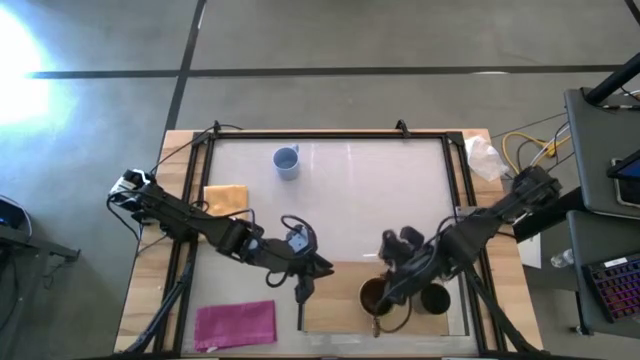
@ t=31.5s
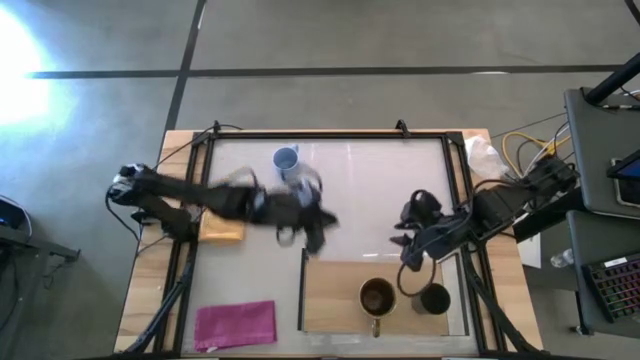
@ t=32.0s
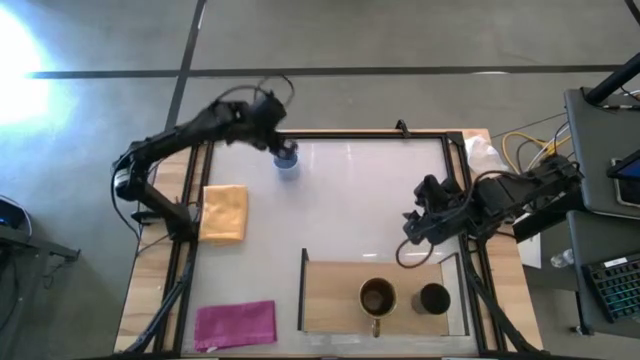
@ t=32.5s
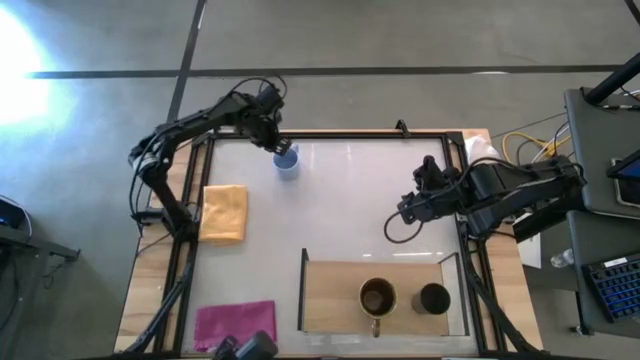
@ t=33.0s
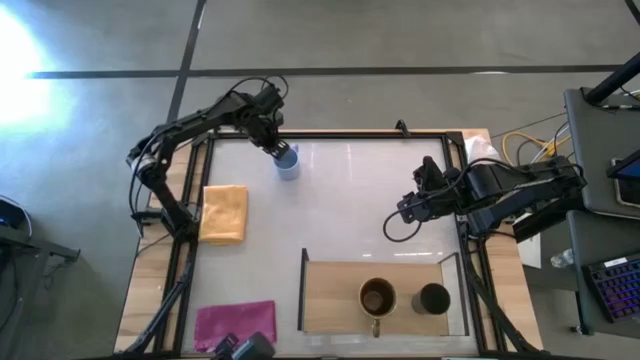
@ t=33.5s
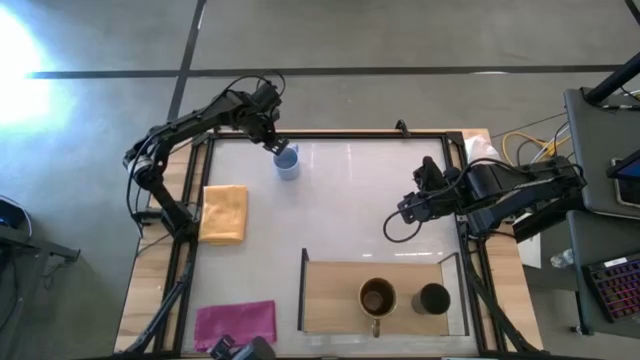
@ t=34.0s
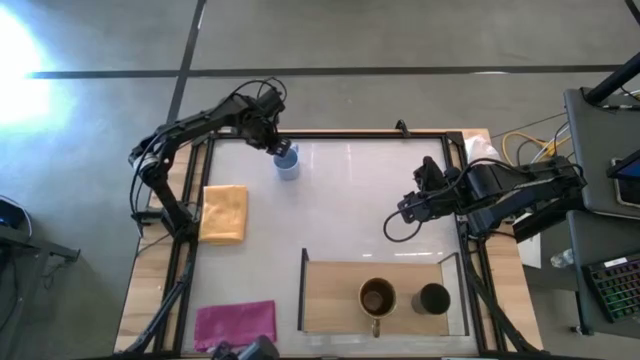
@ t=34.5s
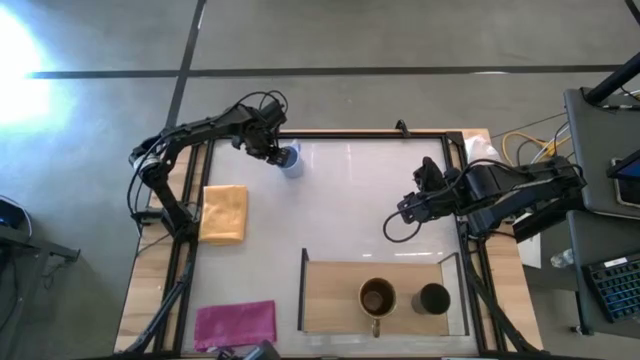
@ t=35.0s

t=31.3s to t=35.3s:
Task: Stack small to large cups/mugs on shelf
Put the blue mug on the shelf

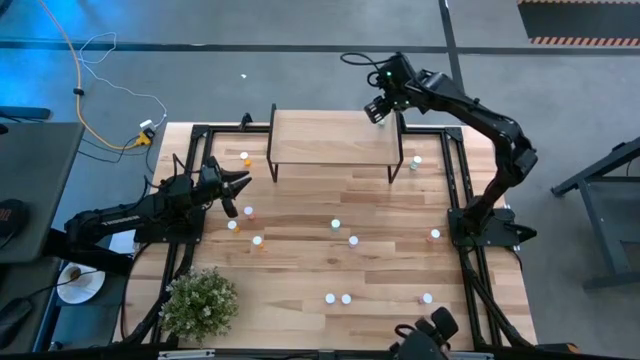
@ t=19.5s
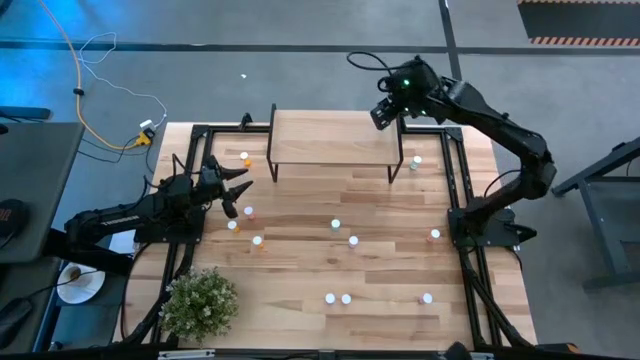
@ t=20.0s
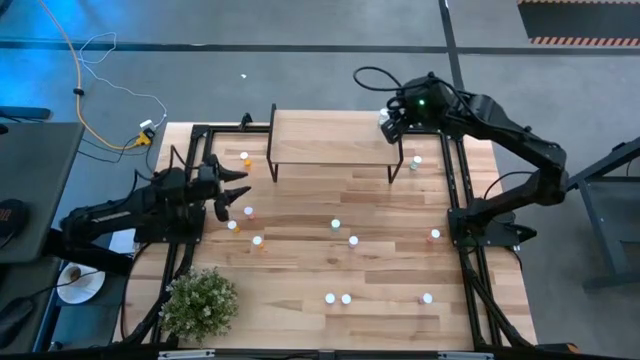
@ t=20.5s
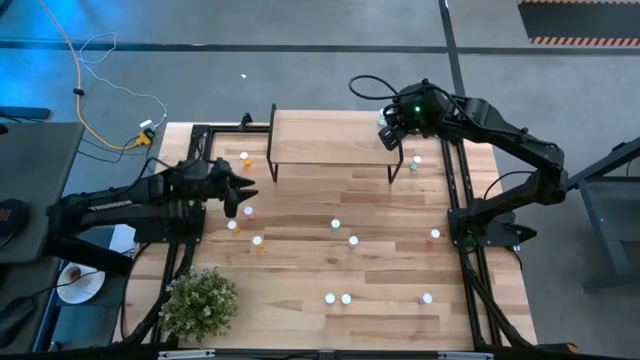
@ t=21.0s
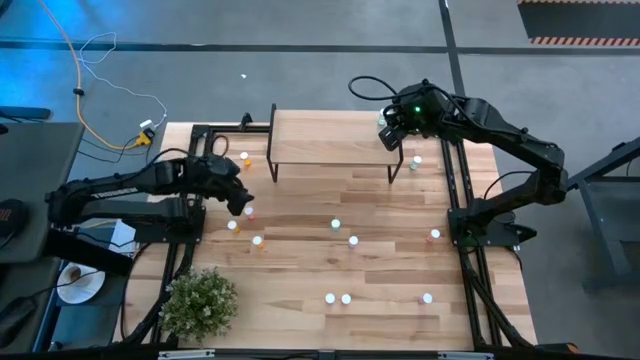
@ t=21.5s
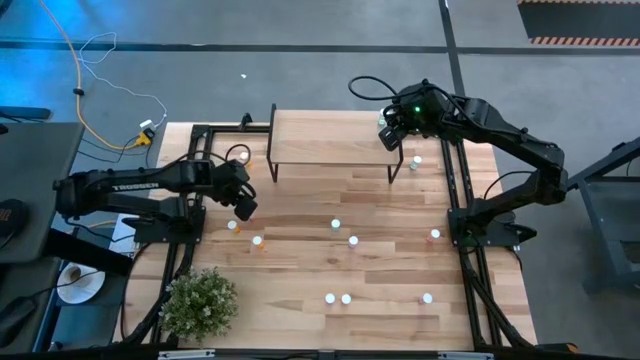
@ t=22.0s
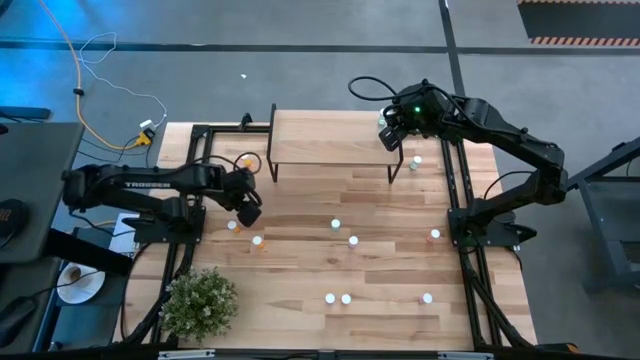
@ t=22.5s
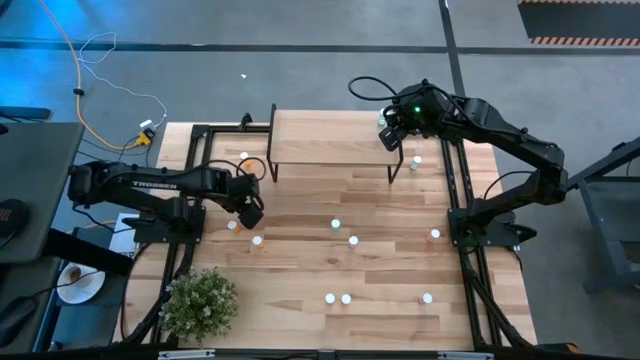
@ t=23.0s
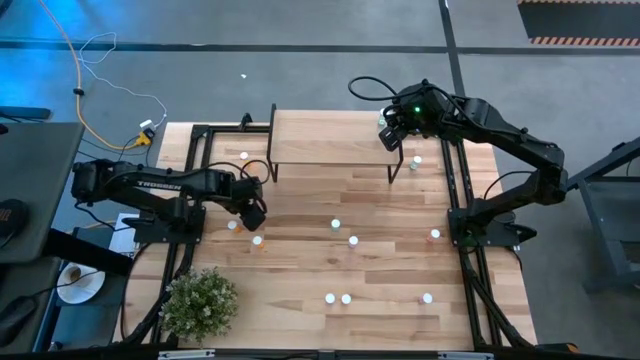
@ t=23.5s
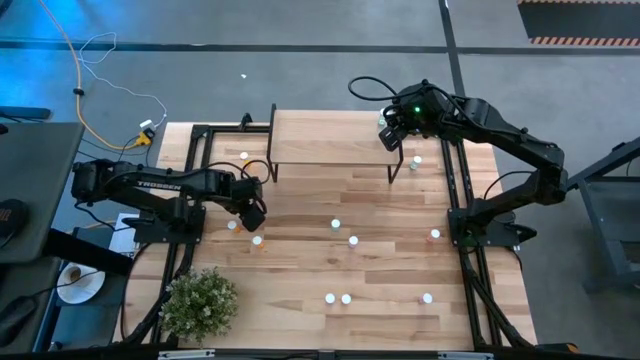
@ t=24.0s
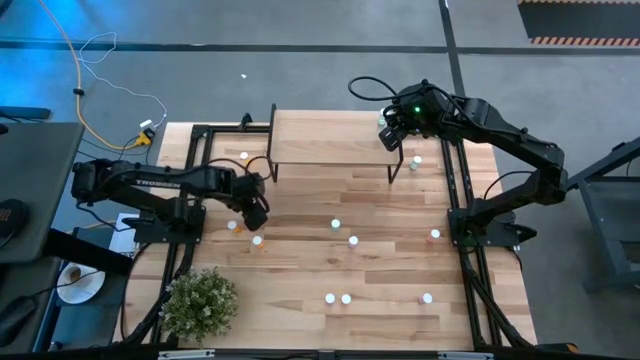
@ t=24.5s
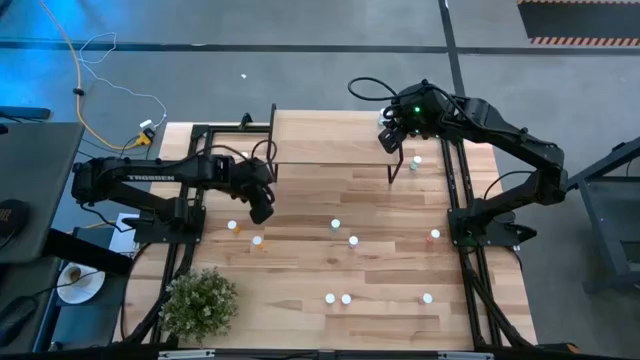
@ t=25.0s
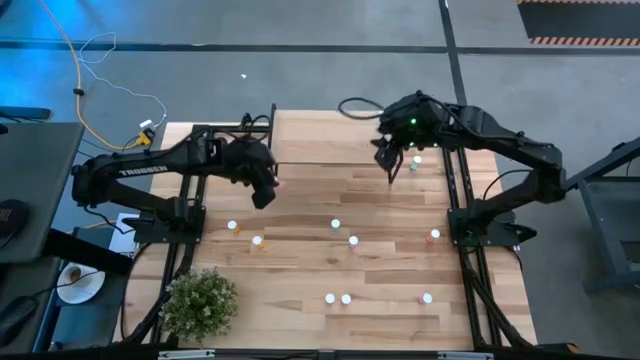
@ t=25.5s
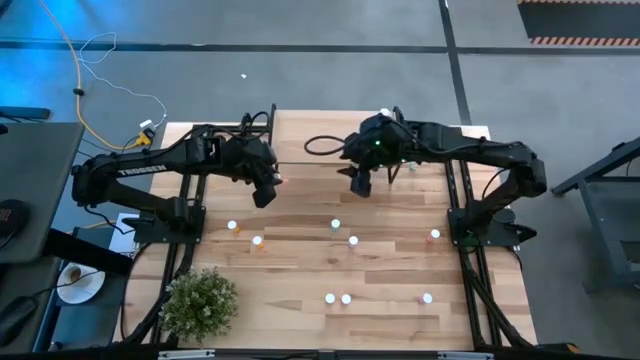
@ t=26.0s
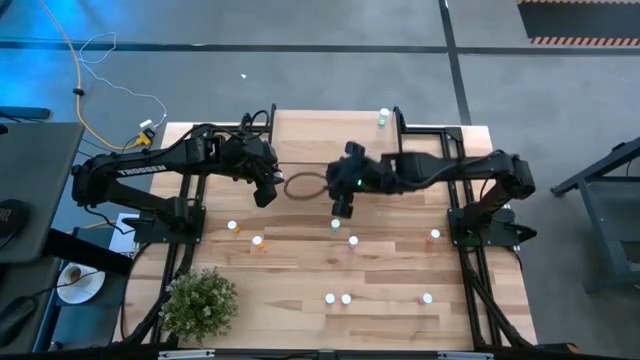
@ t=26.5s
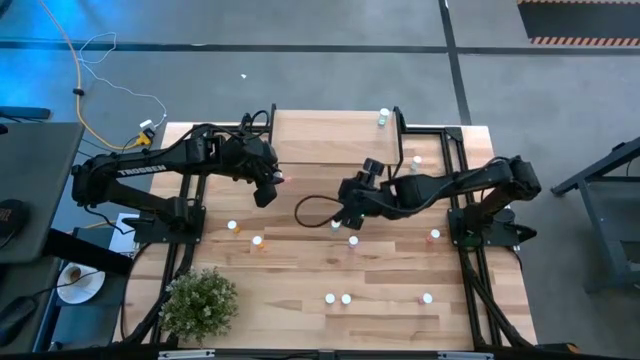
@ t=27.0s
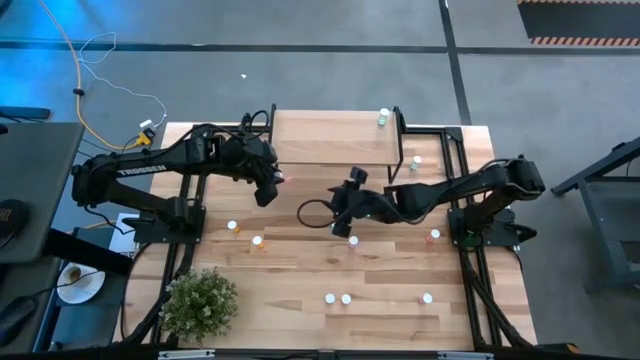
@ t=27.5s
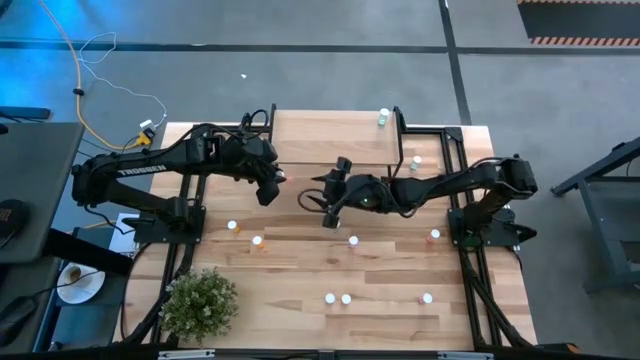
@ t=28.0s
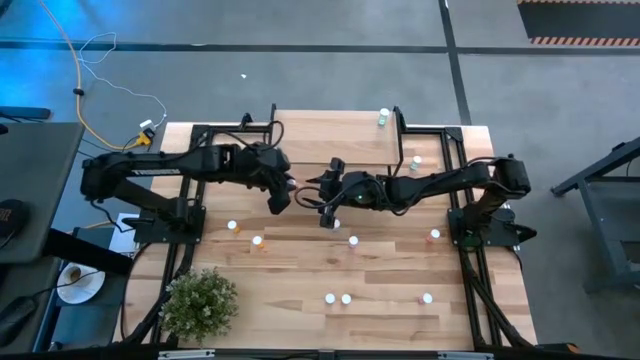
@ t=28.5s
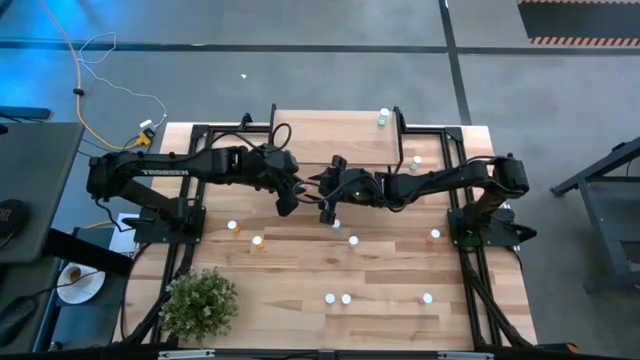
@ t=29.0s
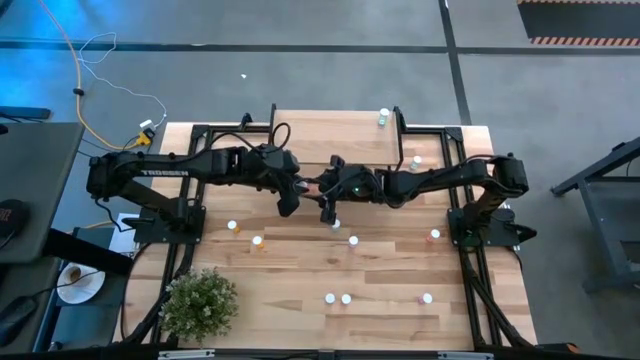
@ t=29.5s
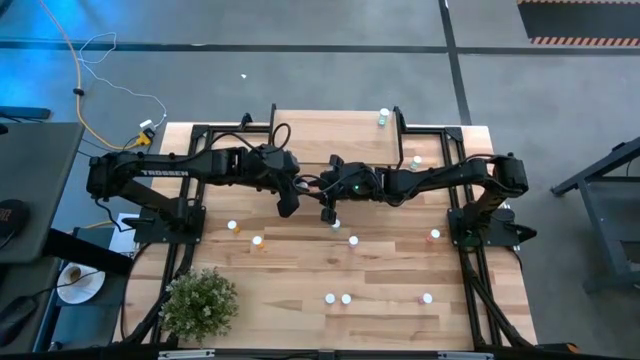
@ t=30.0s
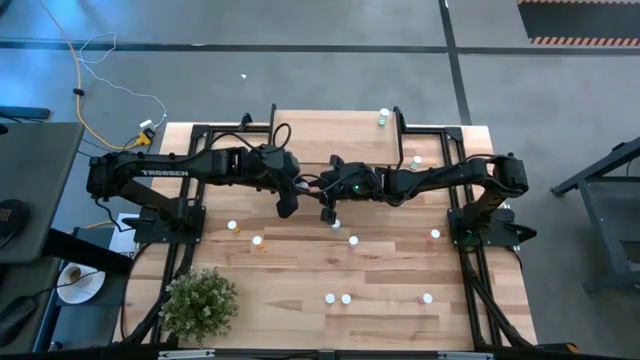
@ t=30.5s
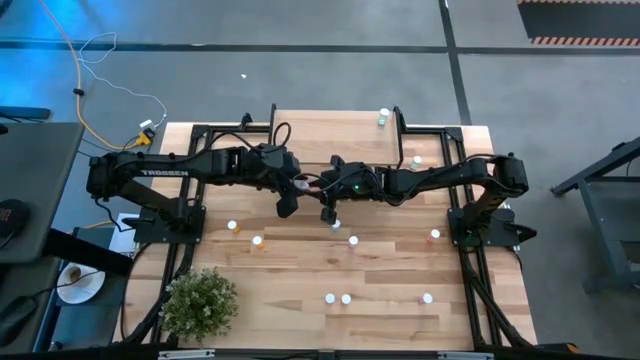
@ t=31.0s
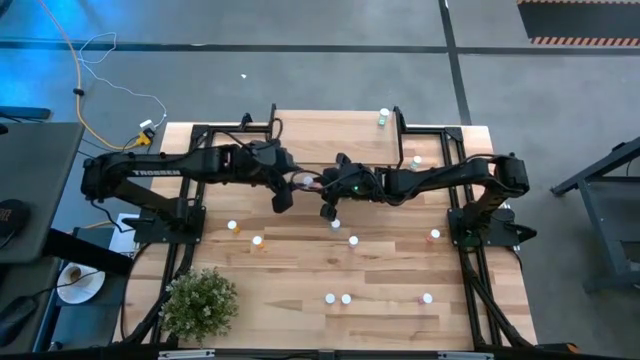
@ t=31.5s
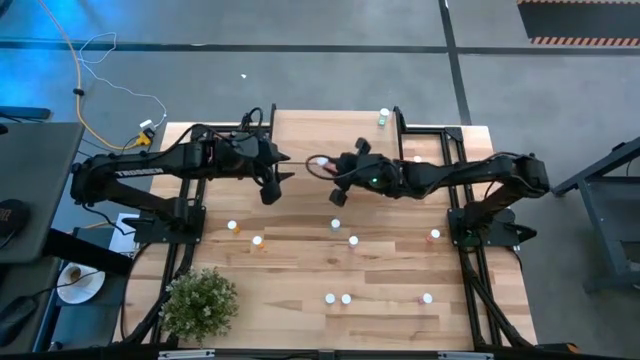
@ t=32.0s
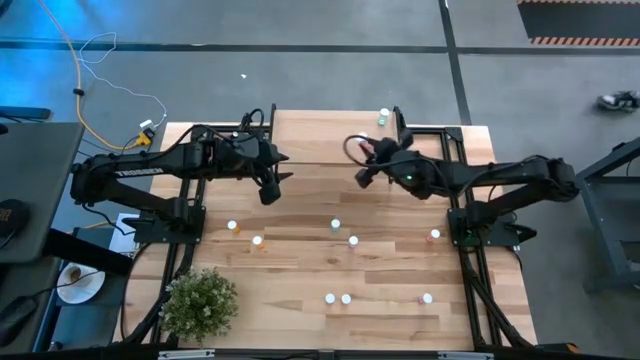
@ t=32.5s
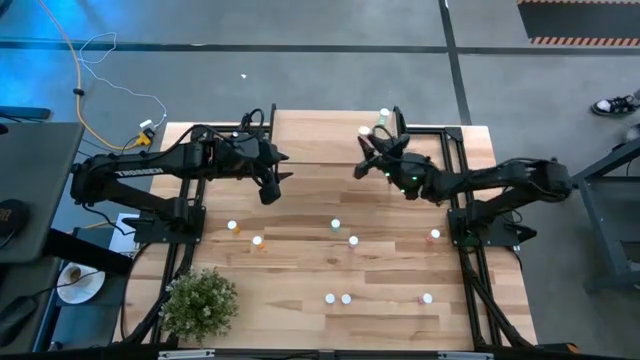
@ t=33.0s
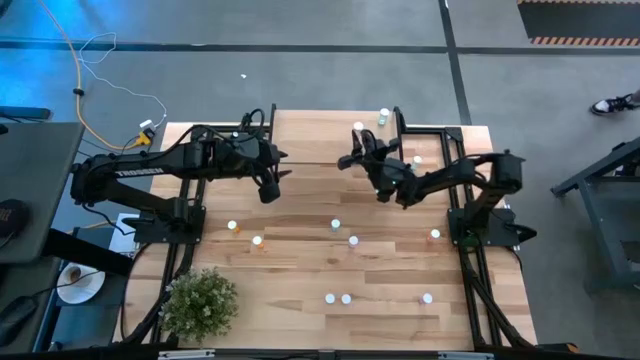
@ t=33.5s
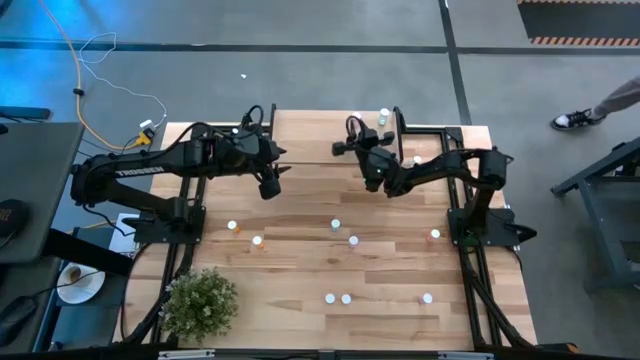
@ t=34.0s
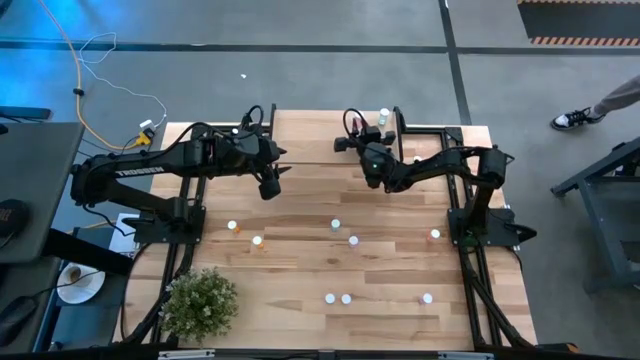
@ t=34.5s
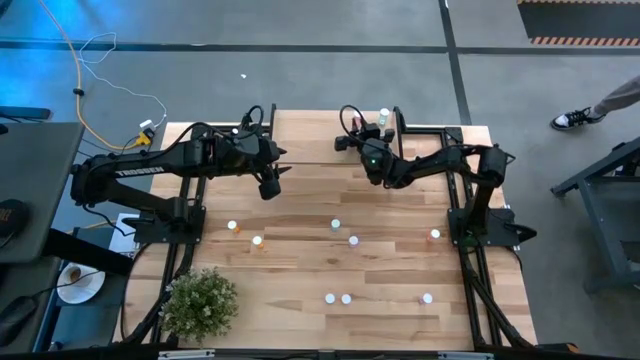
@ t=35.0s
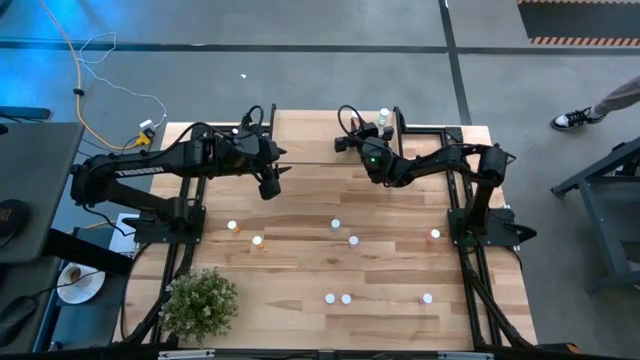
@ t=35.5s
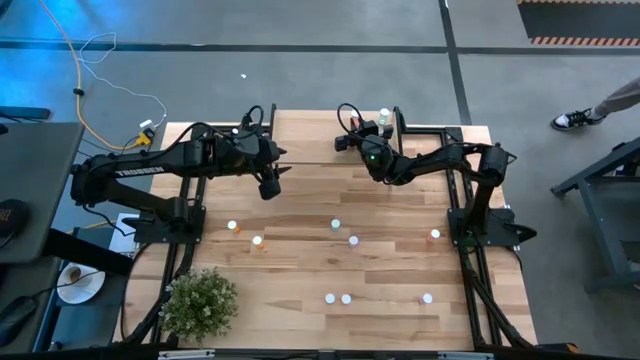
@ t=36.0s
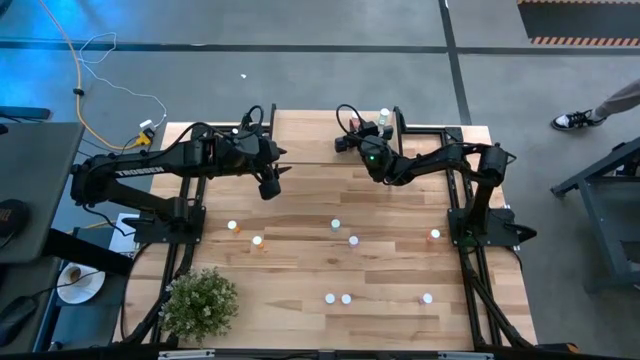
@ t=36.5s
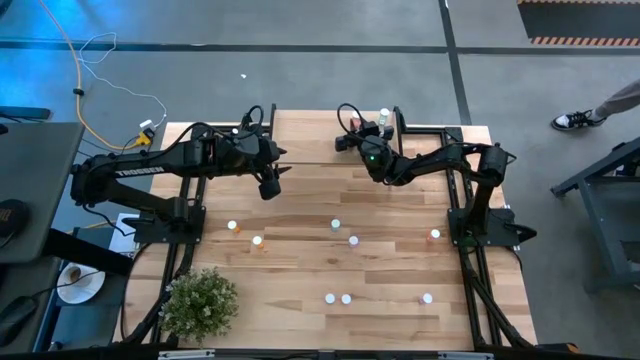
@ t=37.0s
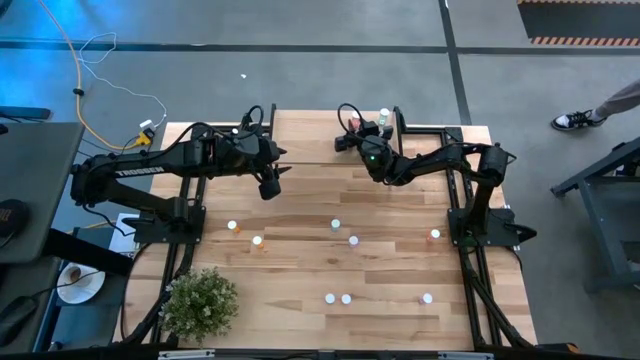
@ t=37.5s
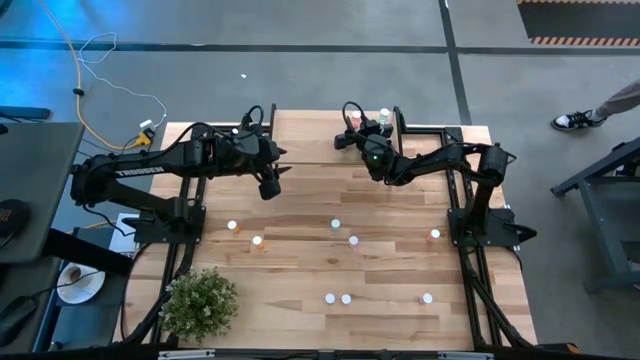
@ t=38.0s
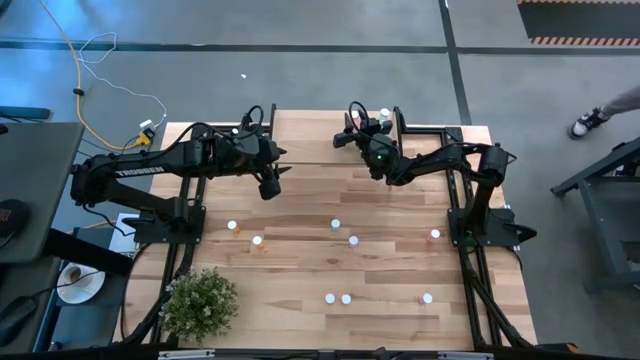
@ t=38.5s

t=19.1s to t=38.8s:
Task: Pick and place medicine bottles onto shelf by color
Put the top red pill bottle on the shelf
